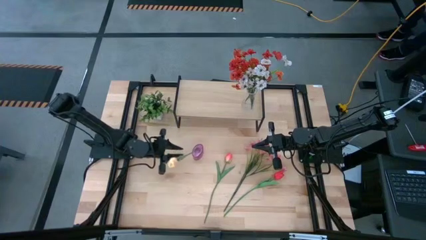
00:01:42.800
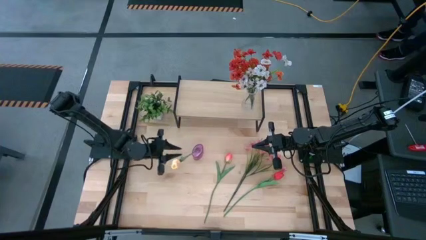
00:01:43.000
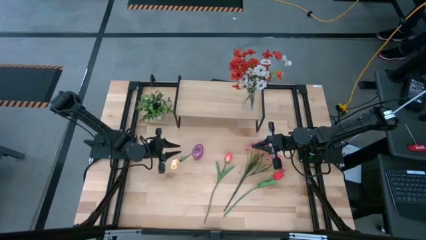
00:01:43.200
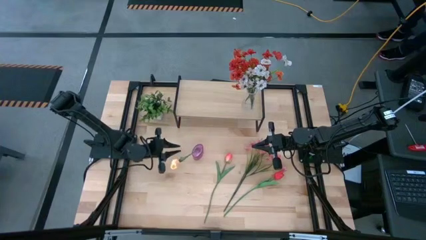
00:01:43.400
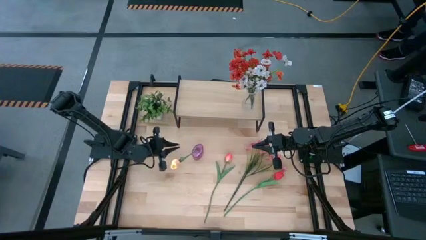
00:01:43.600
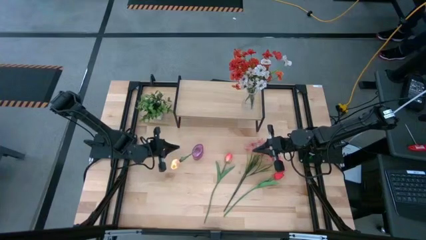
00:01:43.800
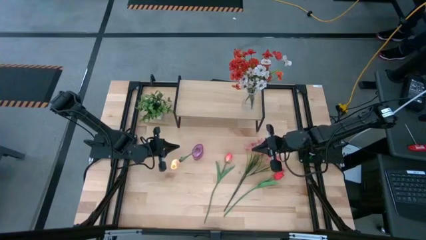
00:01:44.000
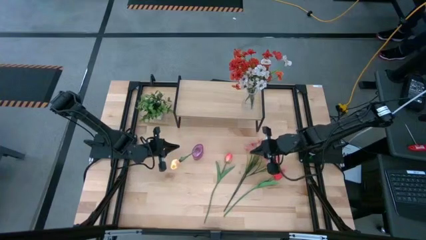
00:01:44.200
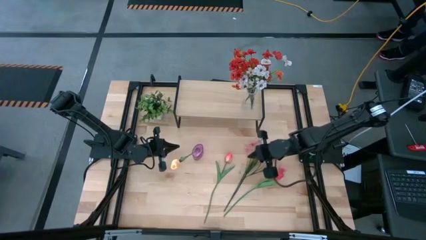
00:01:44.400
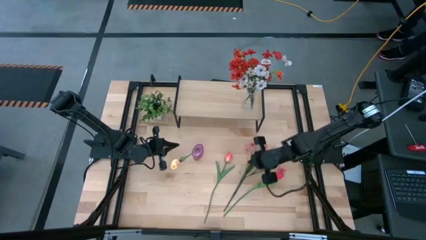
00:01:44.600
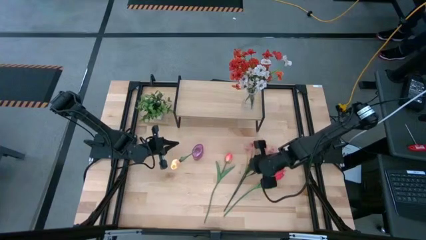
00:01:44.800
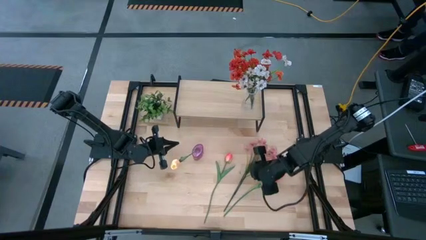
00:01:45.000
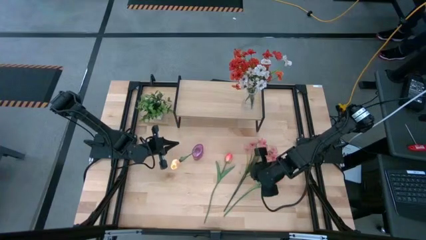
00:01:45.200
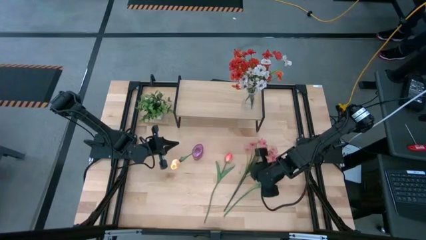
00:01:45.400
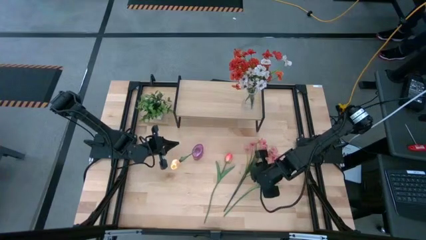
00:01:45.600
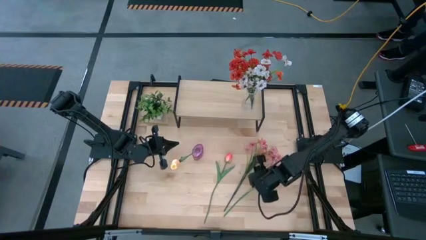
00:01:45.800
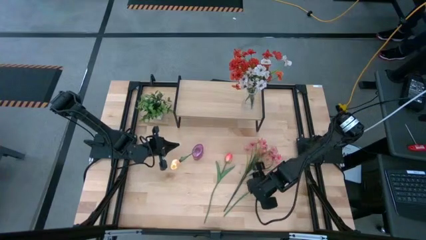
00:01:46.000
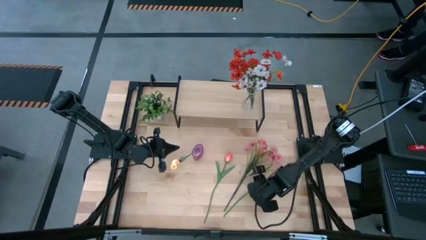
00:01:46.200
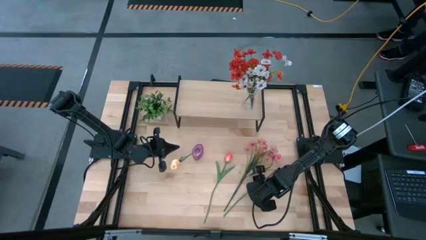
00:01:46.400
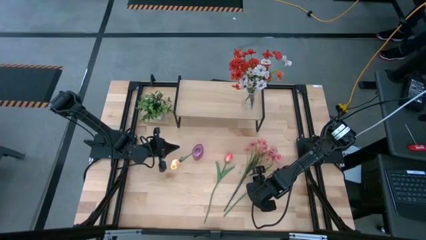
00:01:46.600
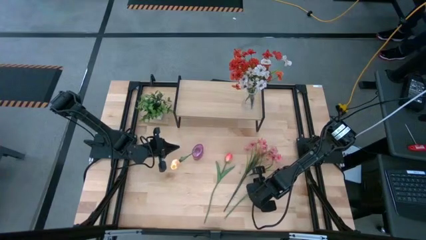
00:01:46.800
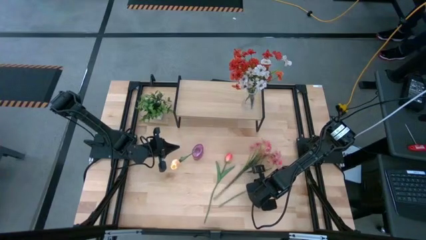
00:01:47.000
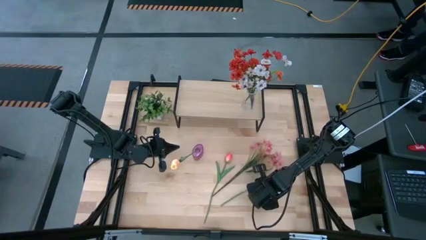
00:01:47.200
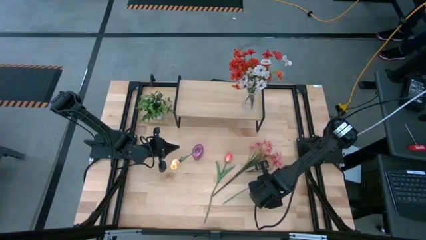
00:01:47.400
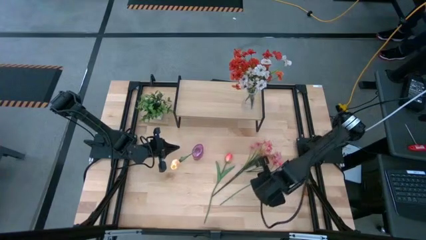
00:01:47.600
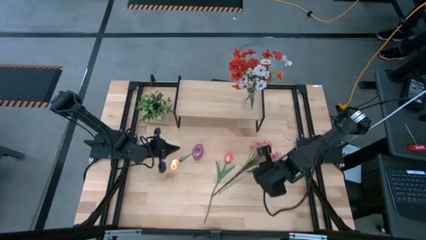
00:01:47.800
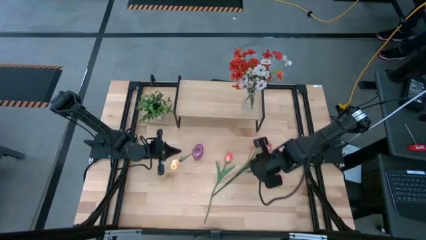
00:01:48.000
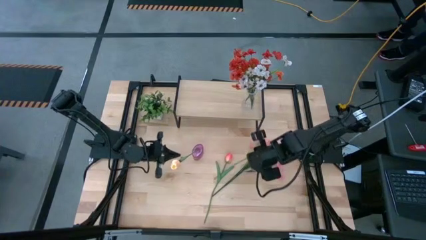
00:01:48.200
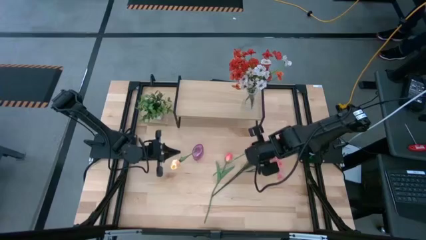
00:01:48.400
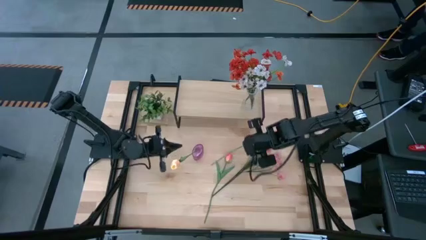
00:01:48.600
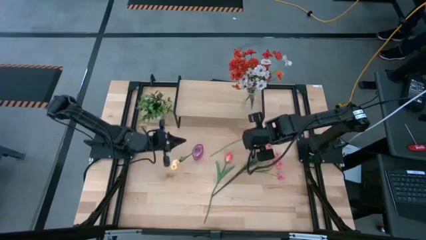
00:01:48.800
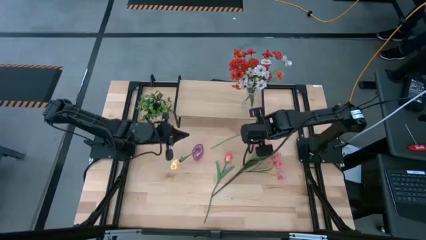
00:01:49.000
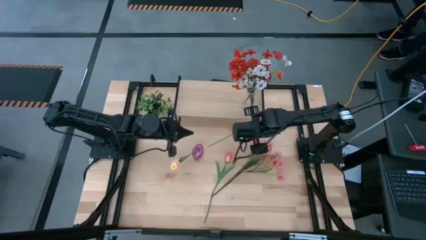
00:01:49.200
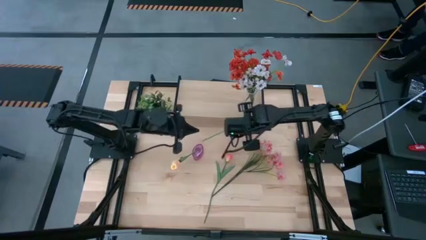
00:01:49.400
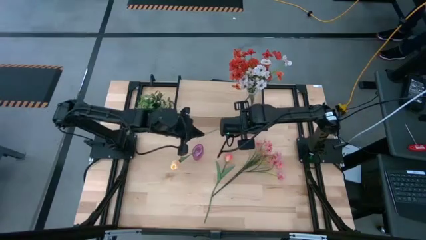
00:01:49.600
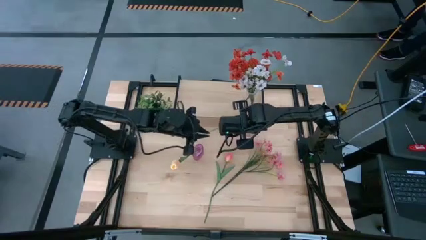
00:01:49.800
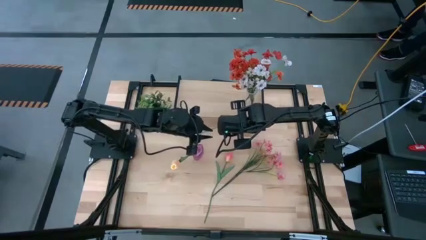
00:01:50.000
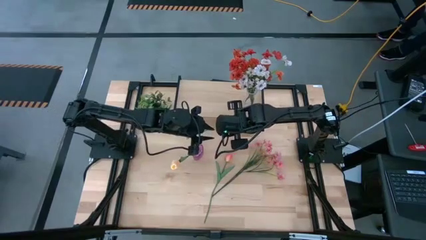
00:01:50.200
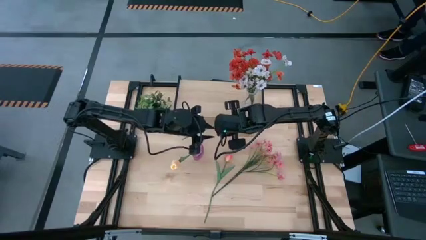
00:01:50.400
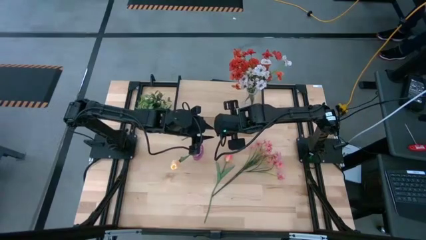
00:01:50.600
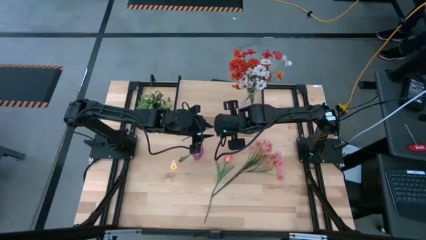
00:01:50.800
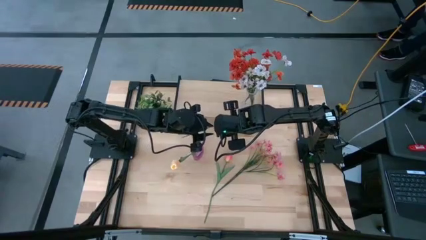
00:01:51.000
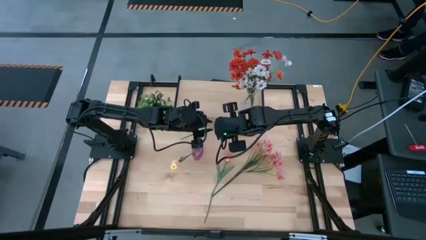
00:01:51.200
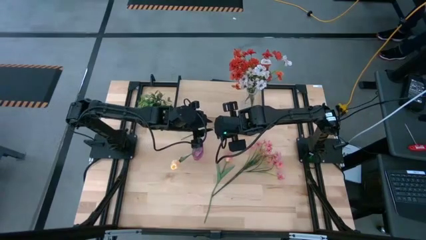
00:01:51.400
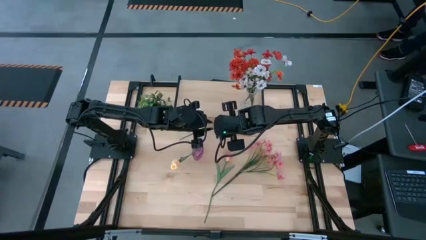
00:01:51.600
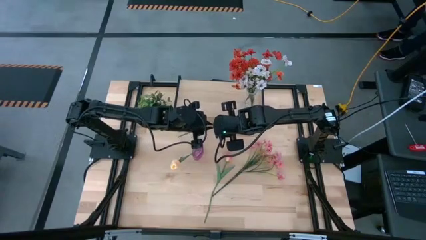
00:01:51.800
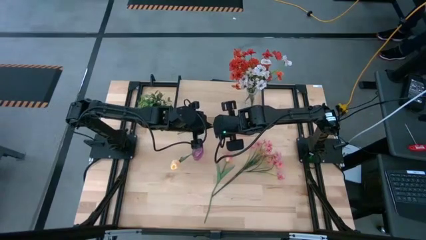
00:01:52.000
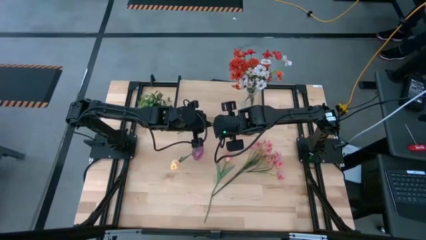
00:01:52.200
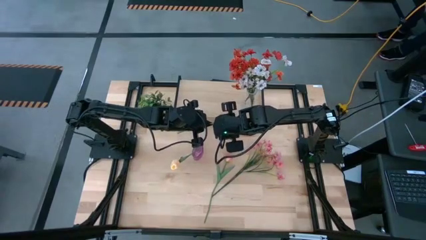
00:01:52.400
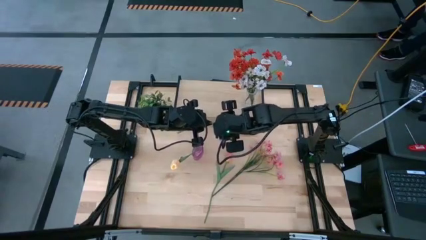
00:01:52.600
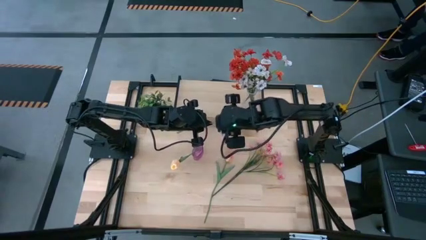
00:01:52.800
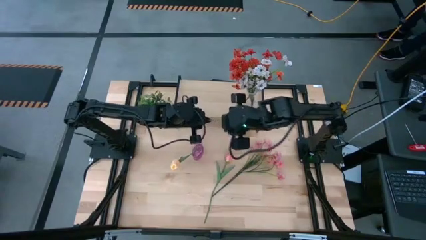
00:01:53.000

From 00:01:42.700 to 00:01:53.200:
Task: Pick and place flowers into a vace then onto a shelf
Put the red flower into the purple vase

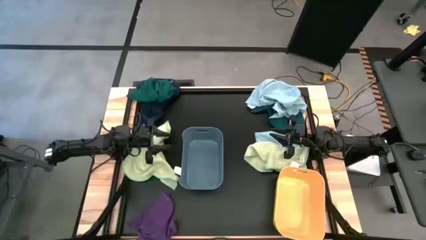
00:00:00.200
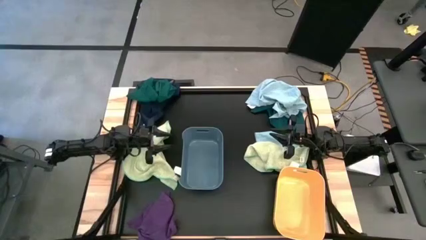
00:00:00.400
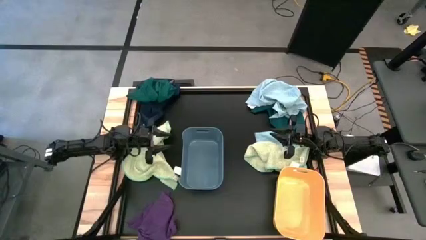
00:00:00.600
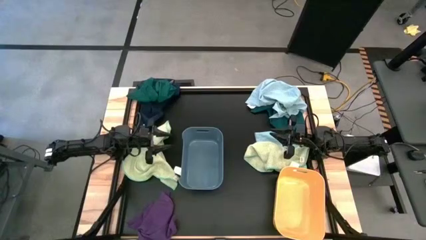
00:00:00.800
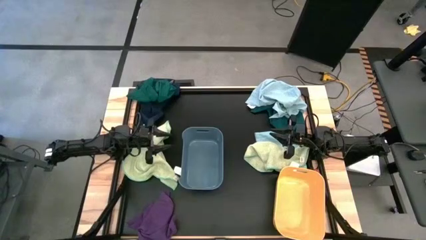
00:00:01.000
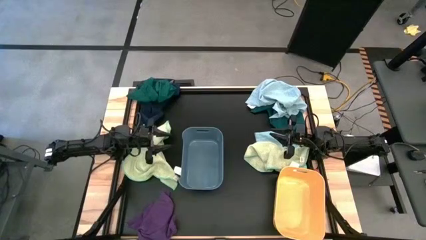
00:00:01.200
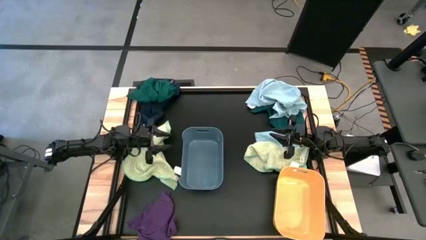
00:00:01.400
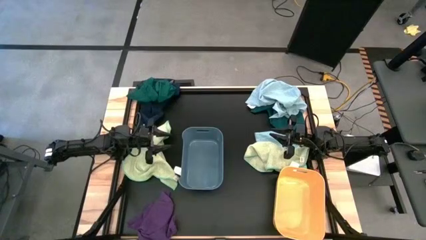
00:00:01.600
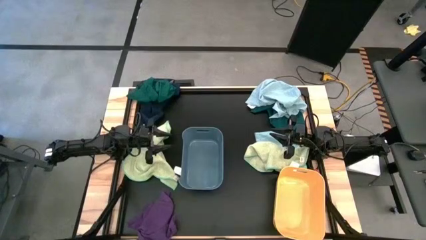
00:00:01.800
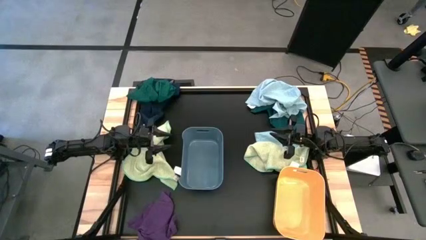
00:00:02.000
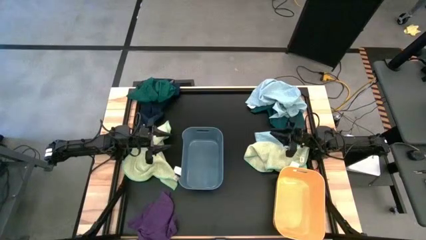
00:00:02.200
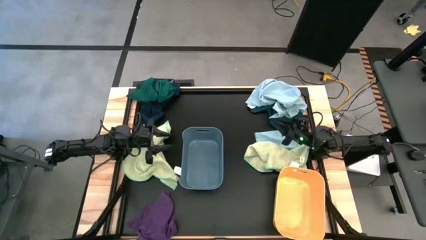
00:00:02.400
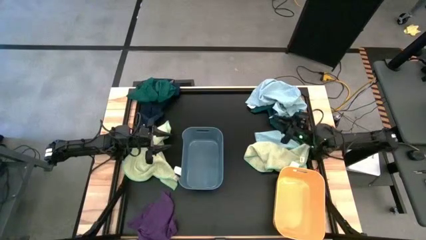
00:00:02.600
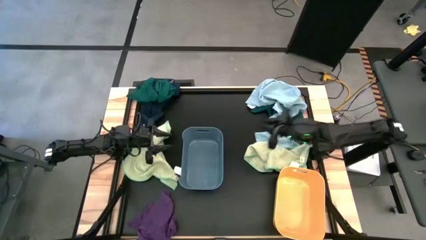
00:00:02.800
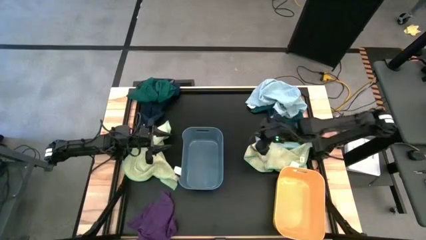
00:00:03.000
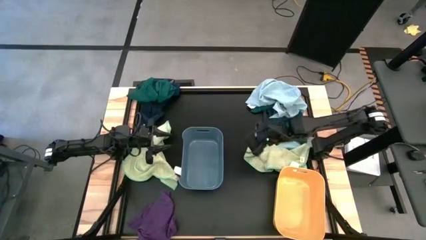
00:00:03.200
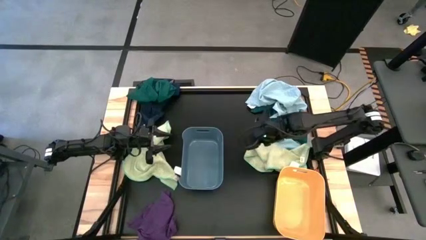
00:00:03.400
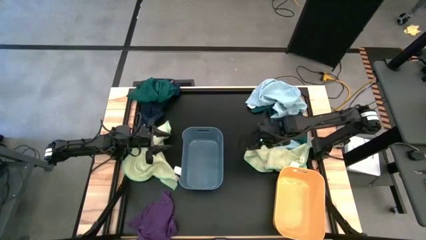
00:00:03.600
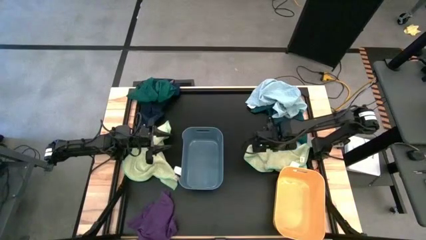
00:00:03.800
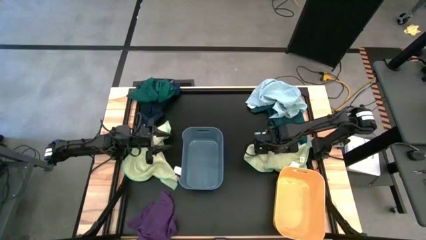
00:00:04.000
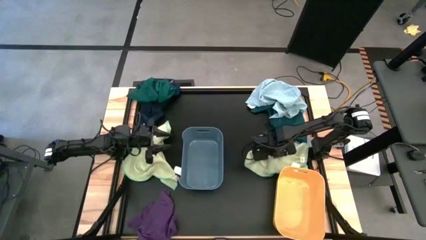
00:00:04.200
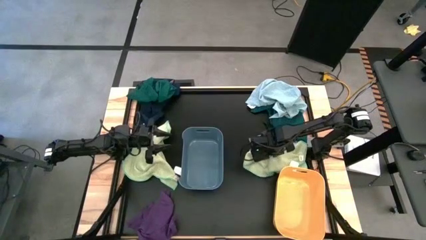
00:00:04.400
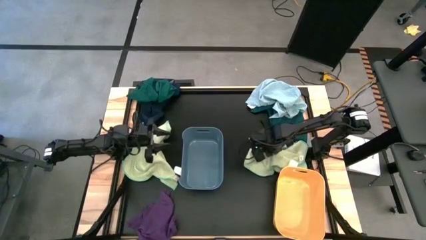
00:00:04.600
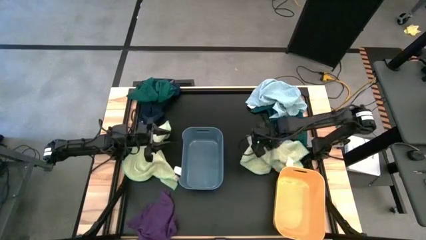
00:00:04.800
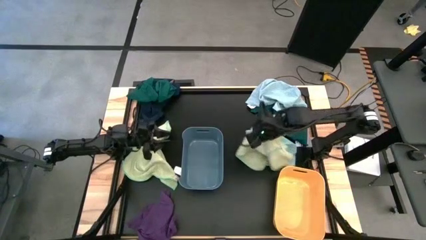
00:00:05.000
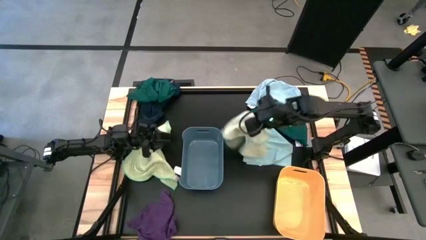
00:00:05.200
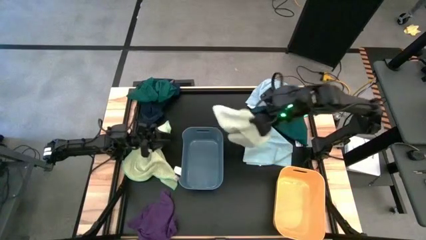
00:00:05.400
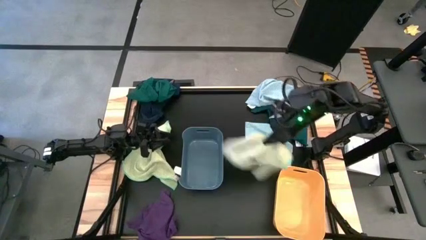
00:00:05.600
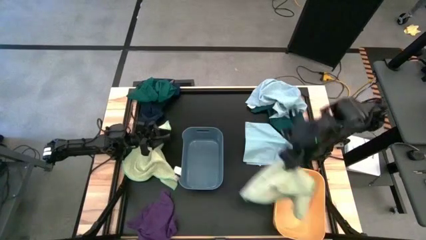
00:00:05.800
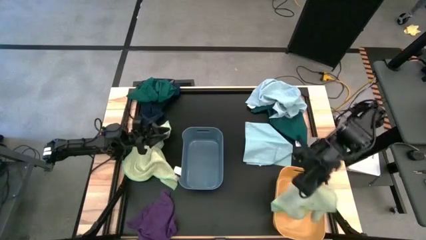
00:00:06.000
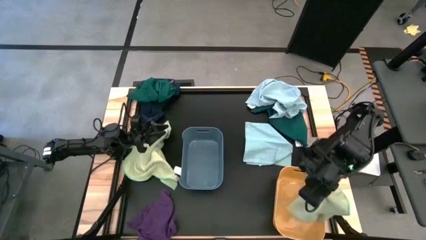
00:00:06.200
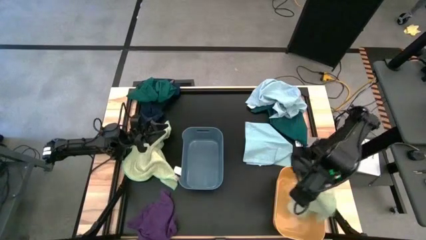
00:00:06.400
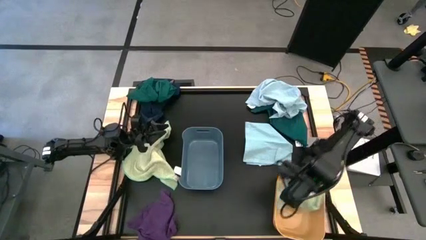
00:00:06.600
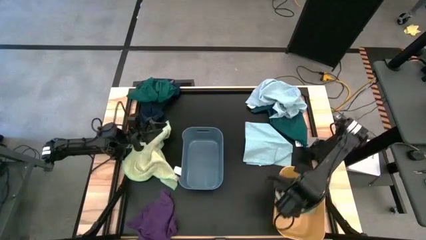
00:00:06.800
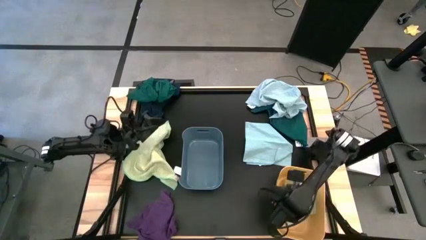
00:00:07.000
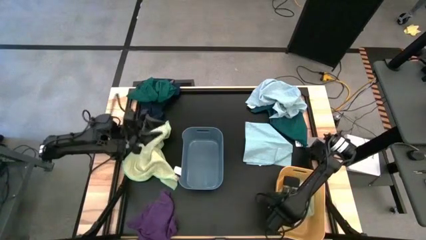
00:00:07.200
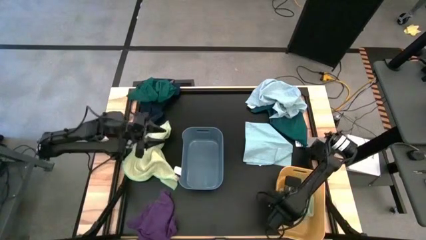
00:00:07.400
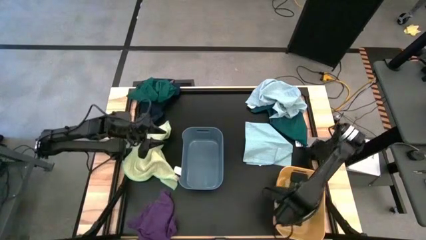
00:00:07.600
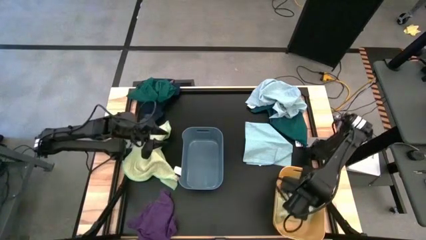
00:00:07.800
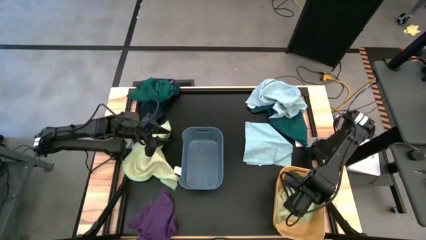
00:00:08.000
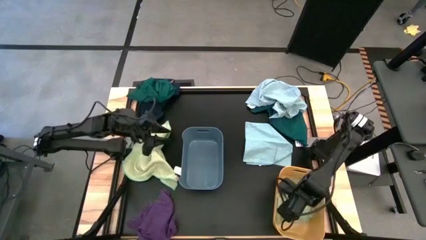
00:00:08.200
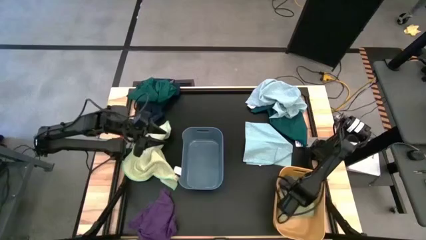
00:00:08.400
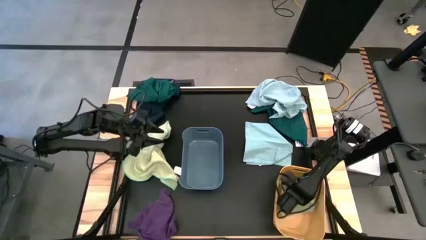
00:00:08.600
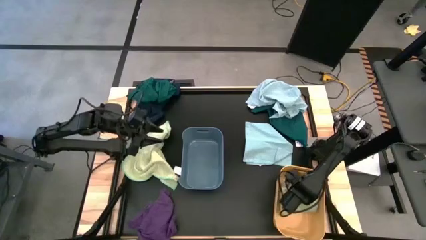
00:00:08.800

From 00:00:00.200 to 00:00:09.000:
Task: Sort microfiber towel by color & place in baskets
Put the right light green microfiber cloth into the yellow bin
